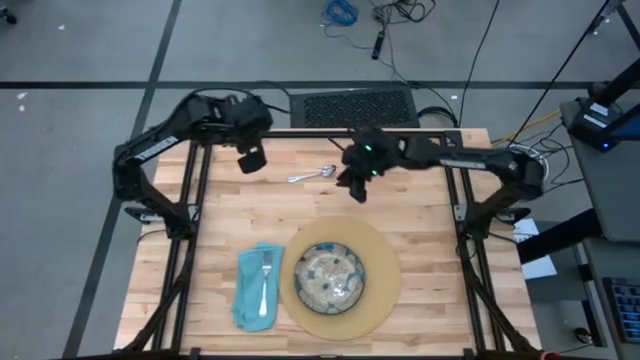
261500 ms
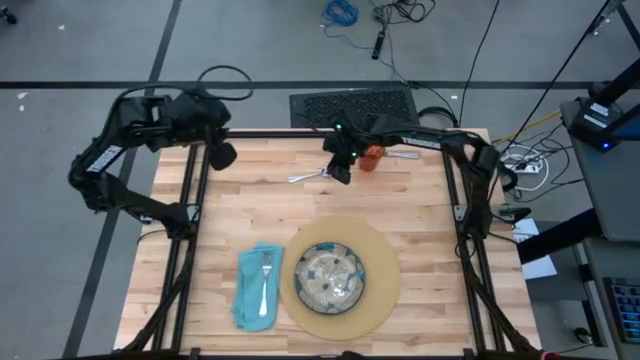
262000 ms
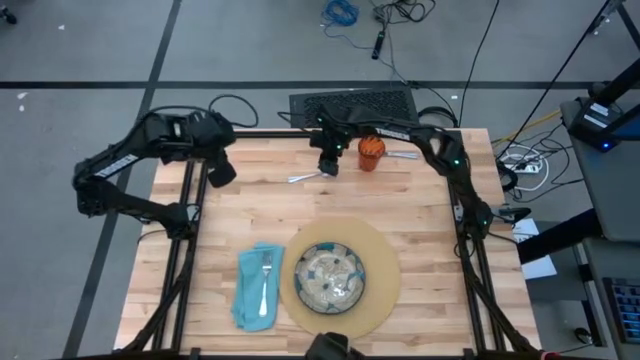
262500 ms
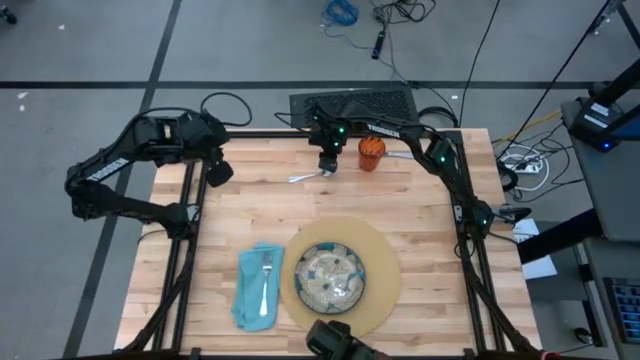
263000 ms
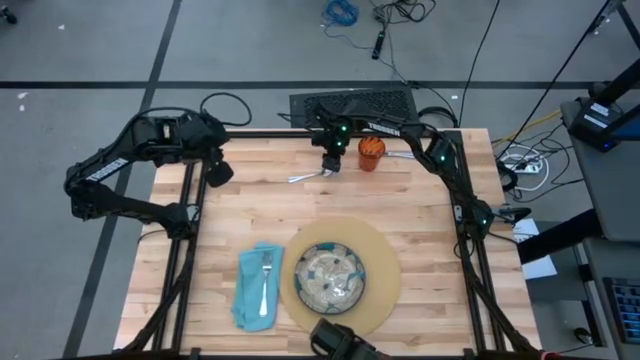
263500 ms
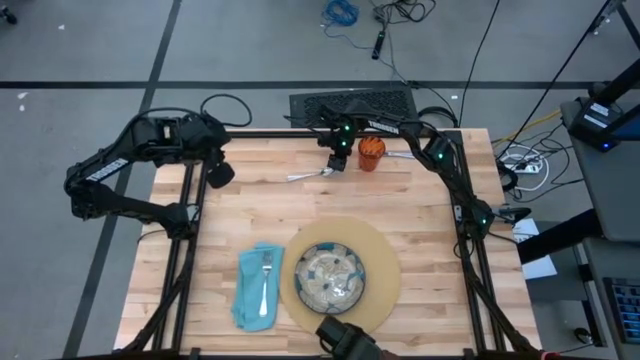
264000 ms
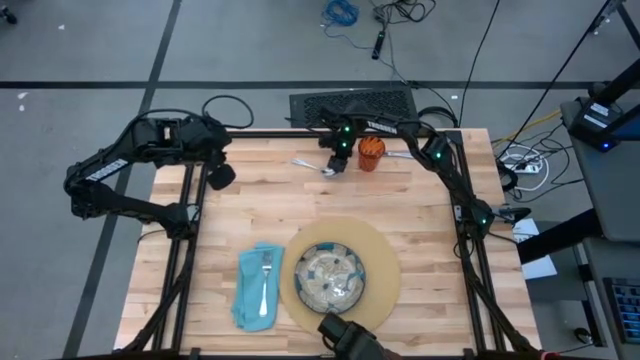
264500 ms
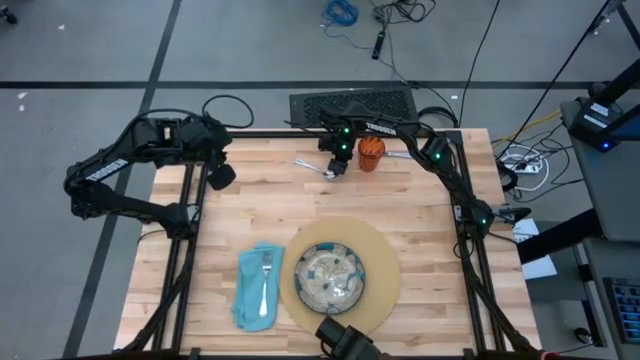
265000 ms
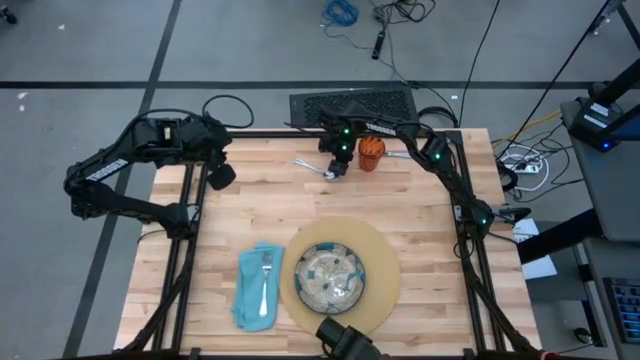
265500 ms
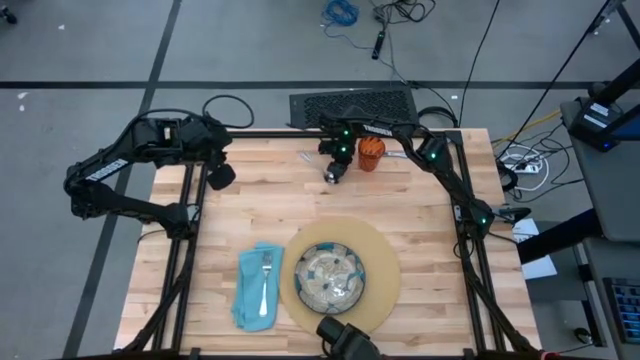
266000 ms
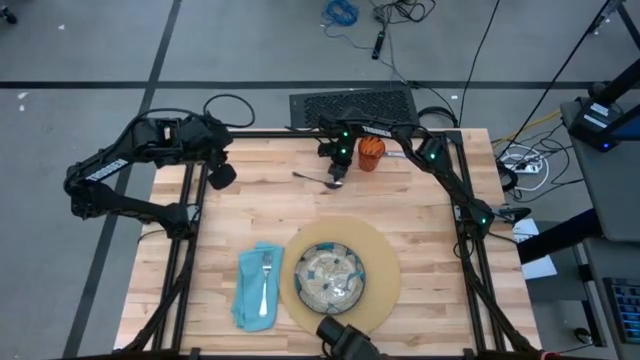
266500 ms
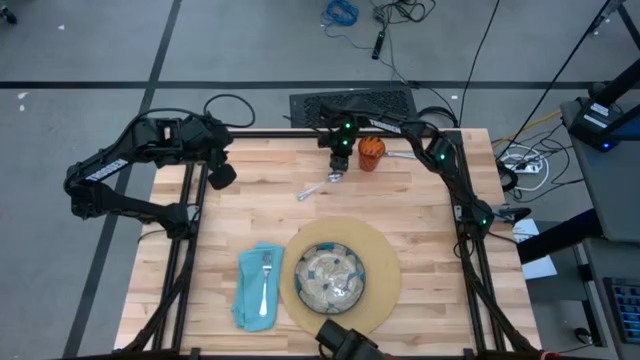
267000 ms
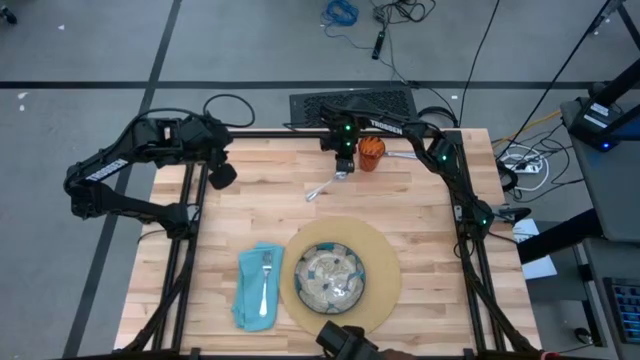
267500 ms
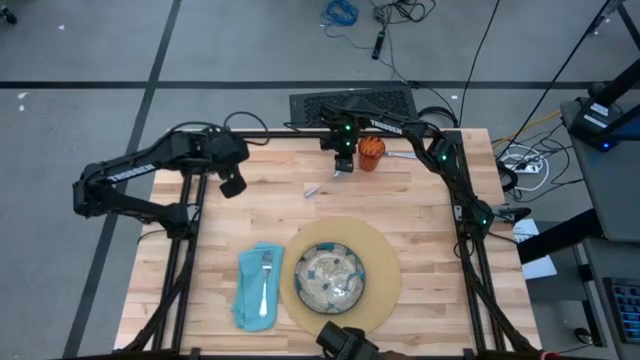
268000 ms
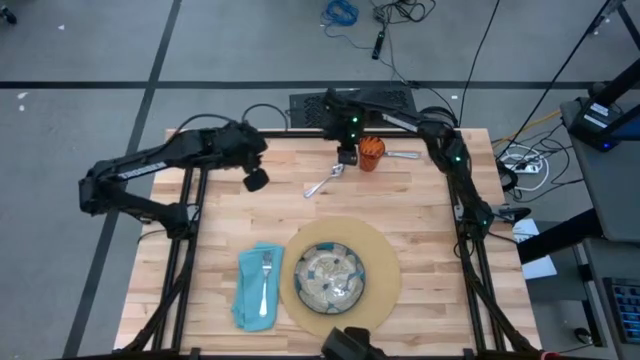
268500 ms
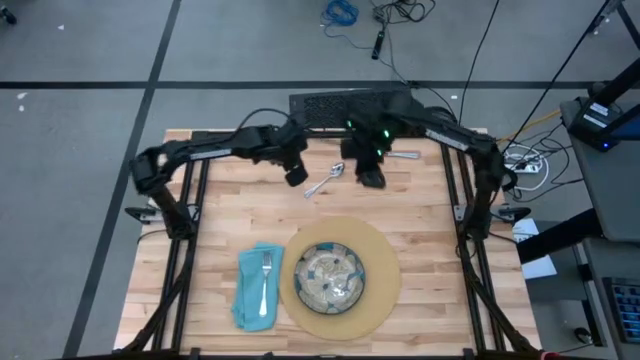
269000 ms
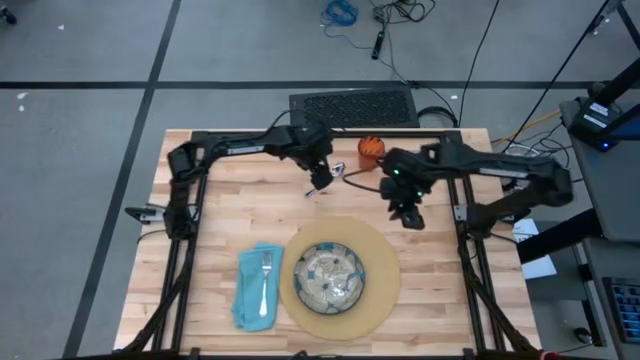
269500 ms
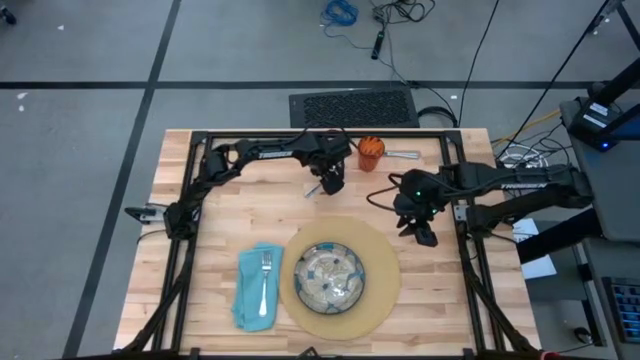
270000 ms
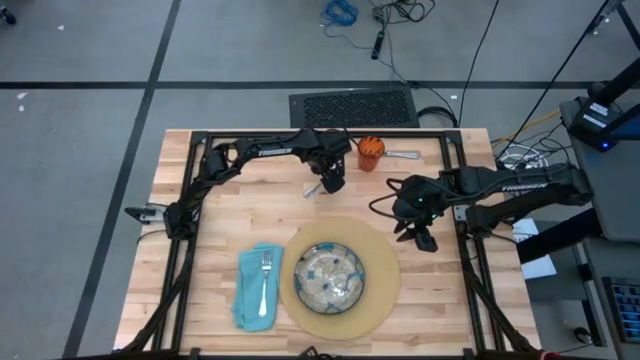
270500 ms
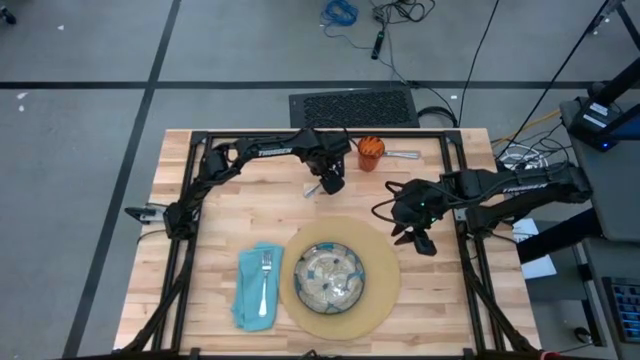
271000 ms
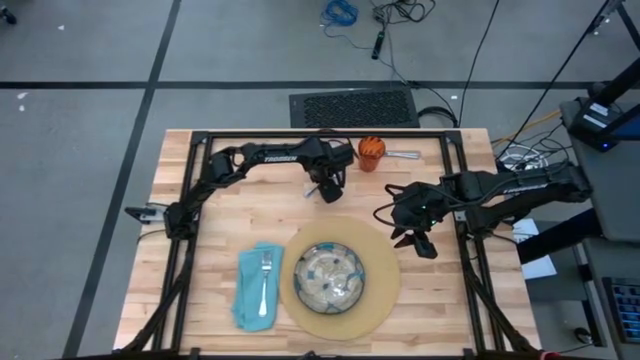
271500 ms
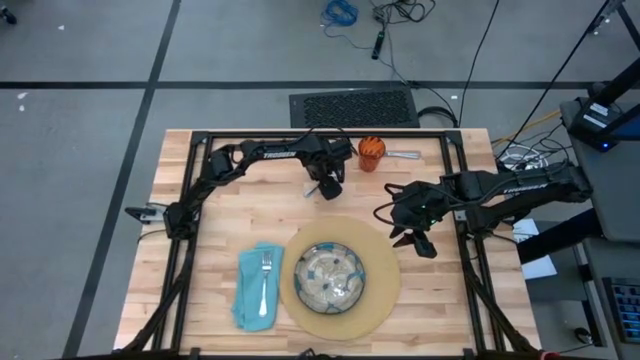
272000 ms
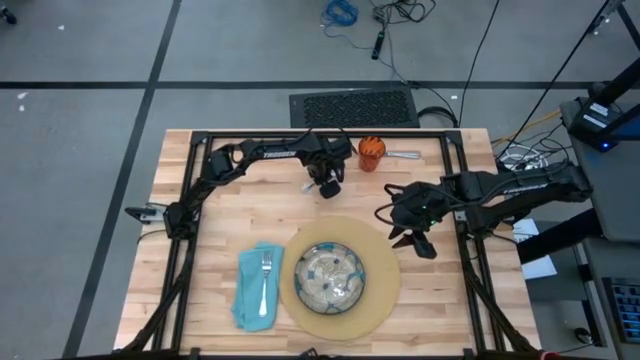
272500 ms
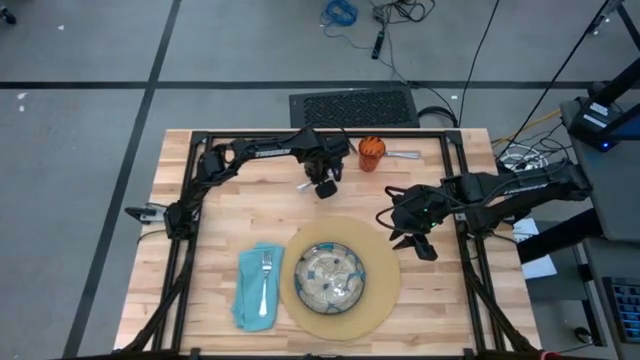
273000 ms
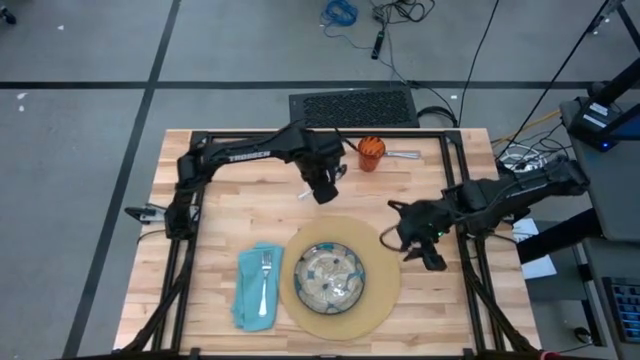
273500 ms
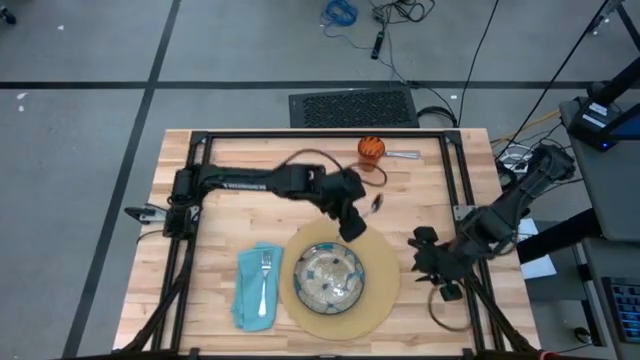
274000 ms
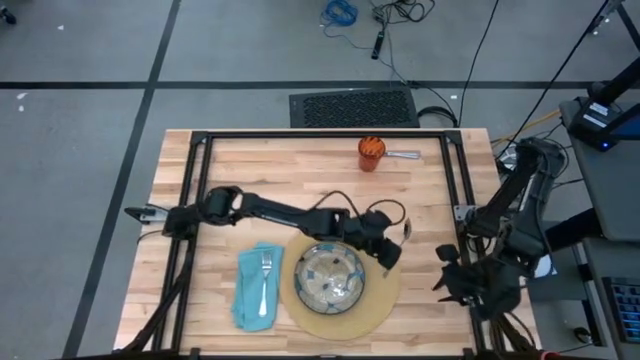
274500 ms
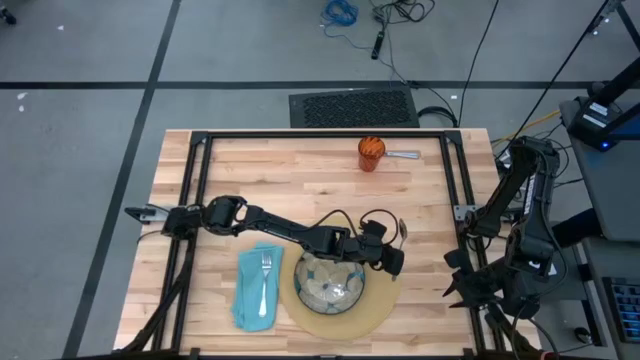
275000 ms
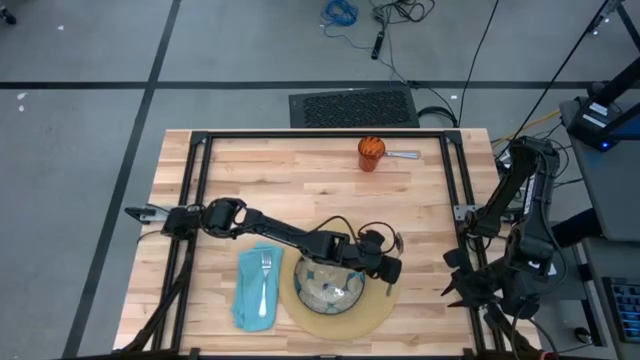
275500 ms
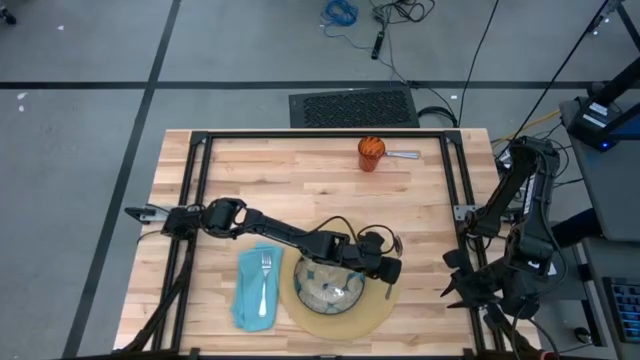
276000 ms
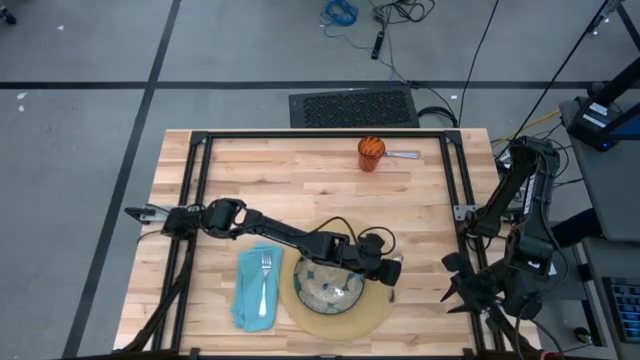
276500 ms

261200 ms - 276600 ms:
Task: Set table place
Move the silver spoon to the right side of the brown mat
